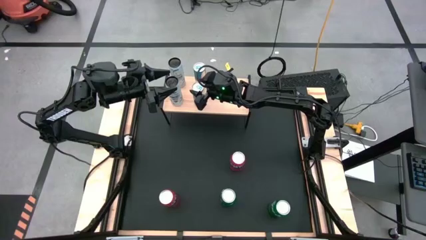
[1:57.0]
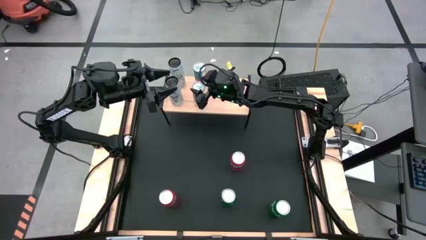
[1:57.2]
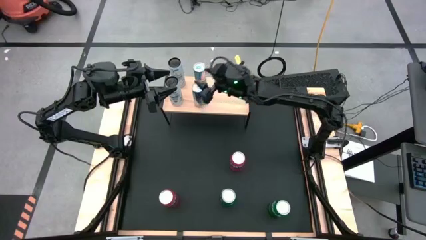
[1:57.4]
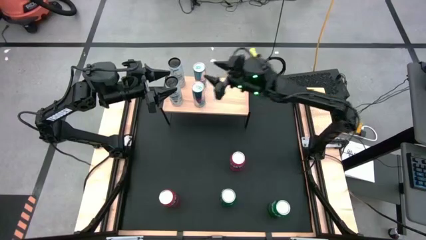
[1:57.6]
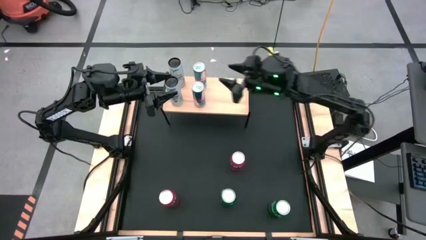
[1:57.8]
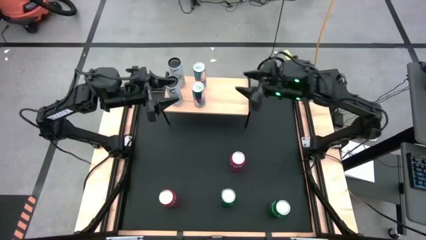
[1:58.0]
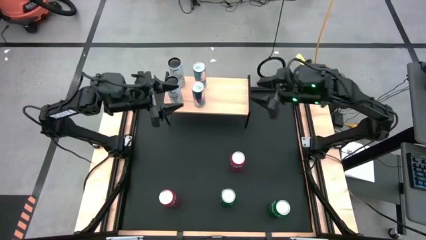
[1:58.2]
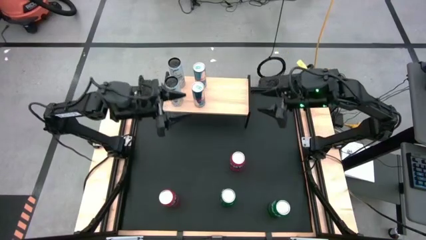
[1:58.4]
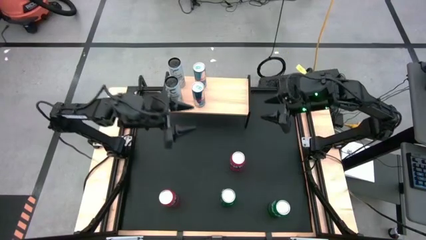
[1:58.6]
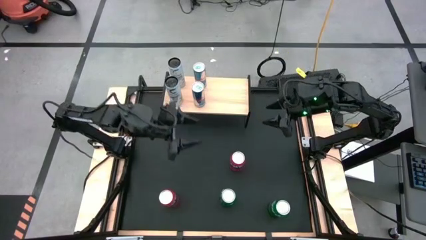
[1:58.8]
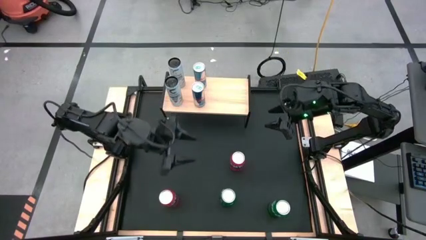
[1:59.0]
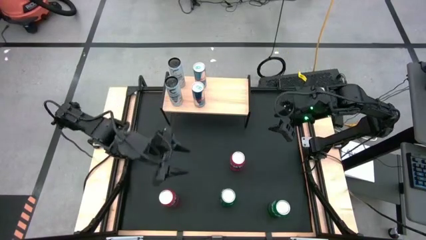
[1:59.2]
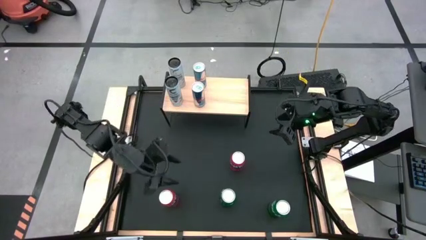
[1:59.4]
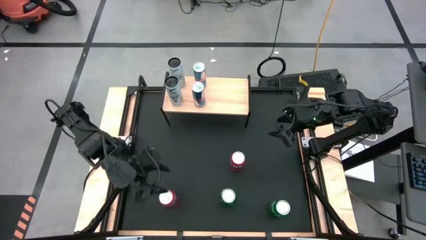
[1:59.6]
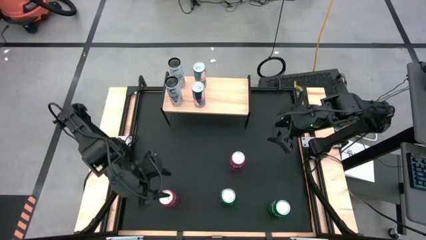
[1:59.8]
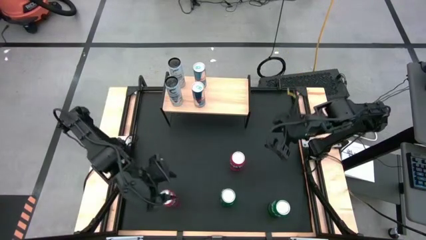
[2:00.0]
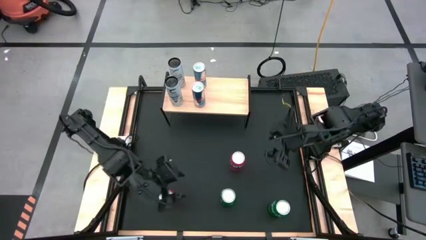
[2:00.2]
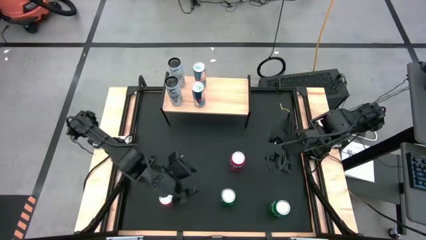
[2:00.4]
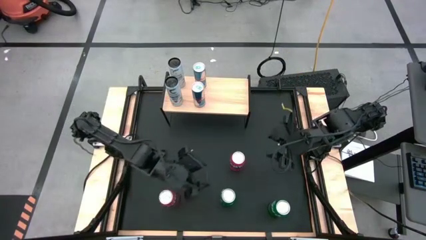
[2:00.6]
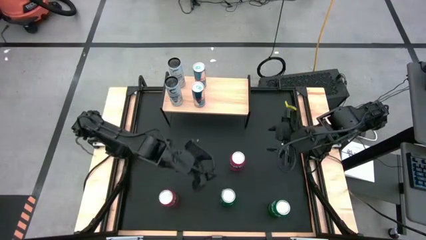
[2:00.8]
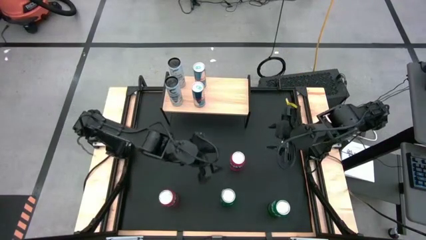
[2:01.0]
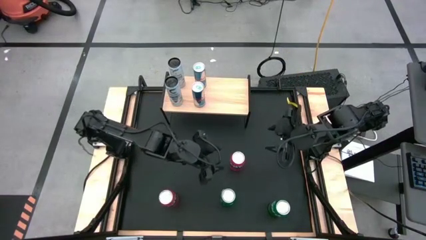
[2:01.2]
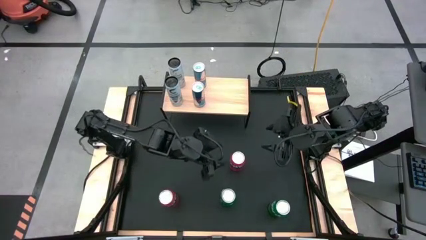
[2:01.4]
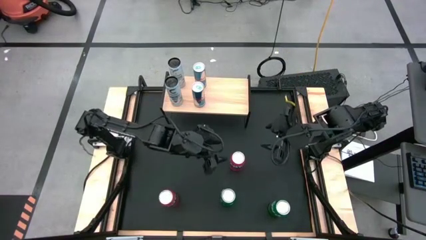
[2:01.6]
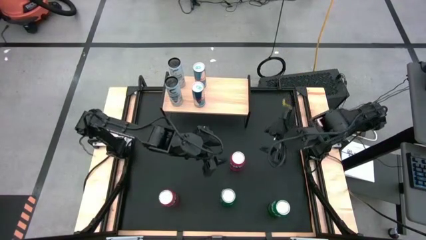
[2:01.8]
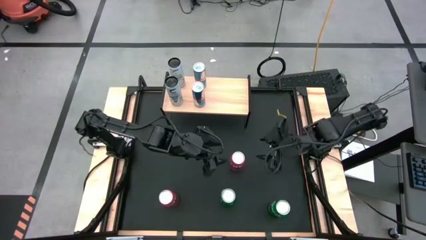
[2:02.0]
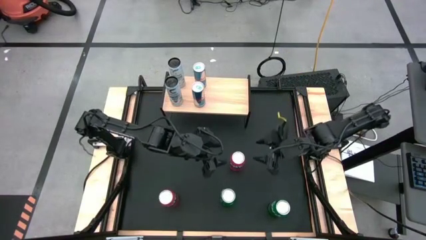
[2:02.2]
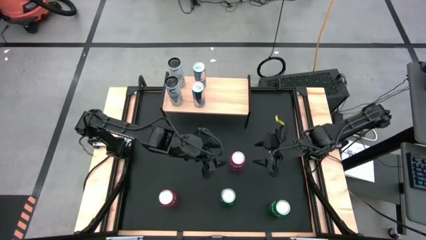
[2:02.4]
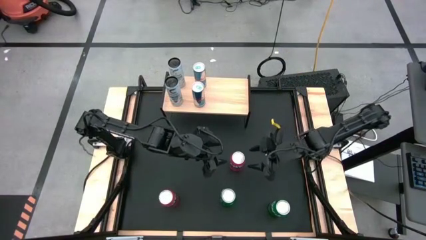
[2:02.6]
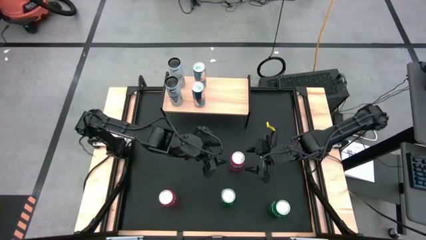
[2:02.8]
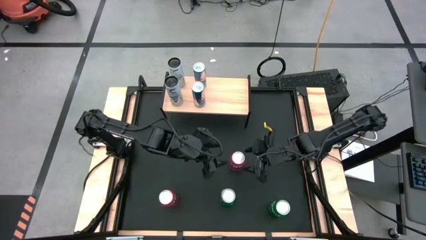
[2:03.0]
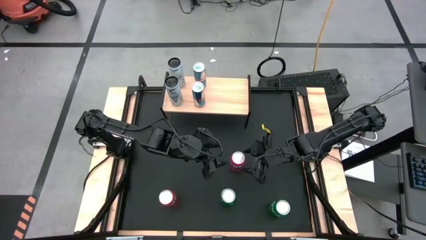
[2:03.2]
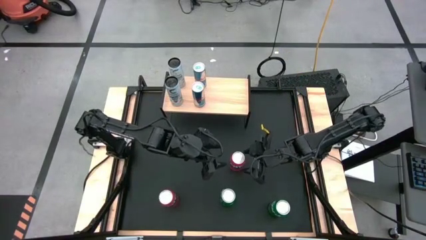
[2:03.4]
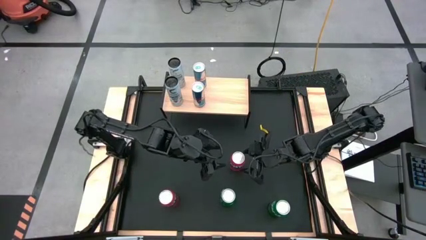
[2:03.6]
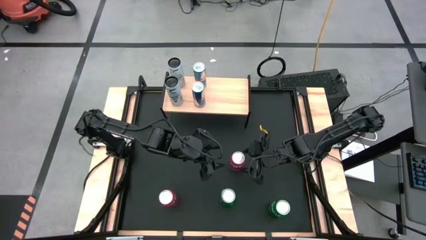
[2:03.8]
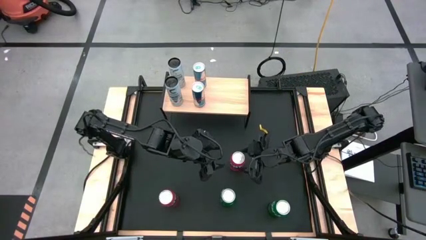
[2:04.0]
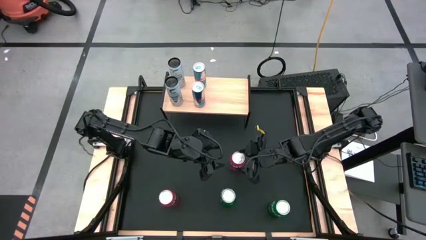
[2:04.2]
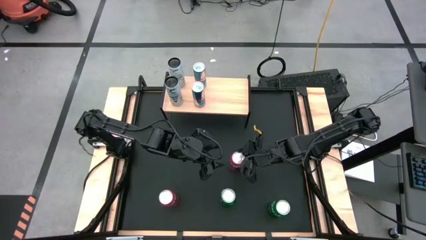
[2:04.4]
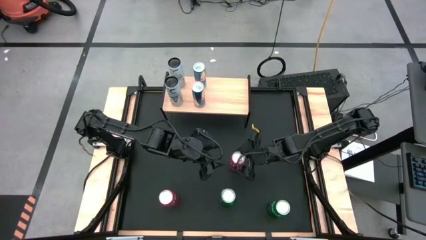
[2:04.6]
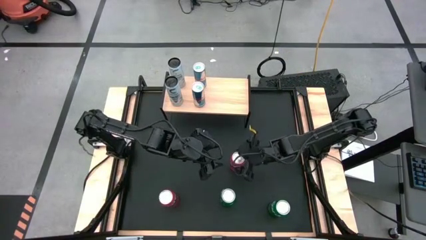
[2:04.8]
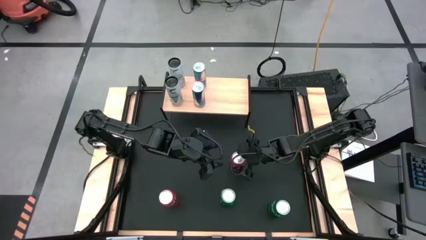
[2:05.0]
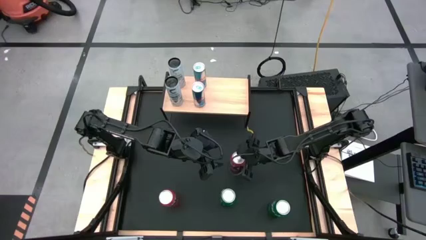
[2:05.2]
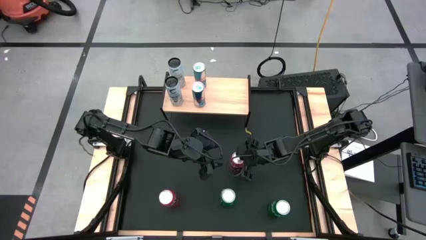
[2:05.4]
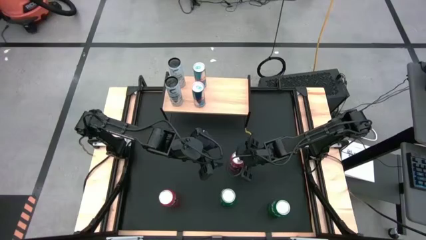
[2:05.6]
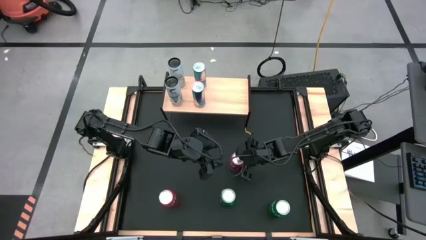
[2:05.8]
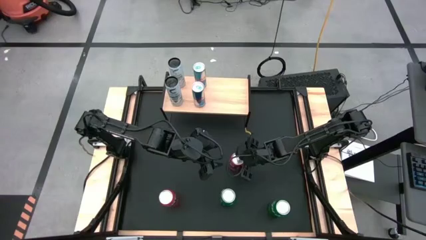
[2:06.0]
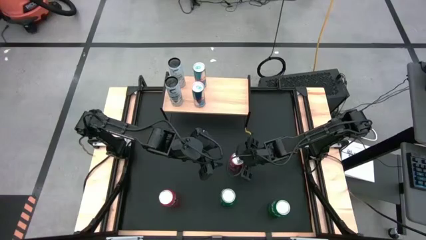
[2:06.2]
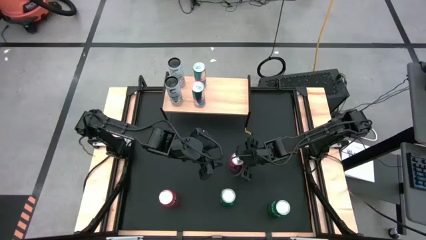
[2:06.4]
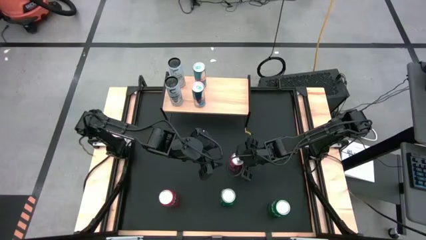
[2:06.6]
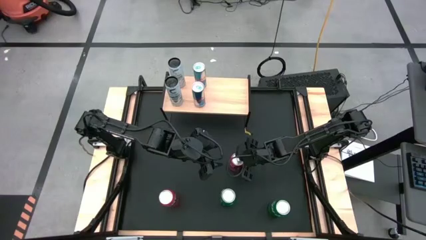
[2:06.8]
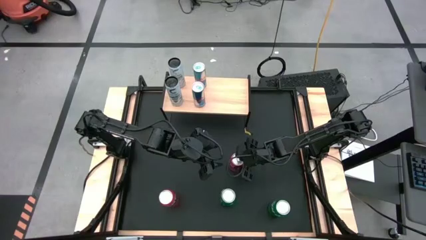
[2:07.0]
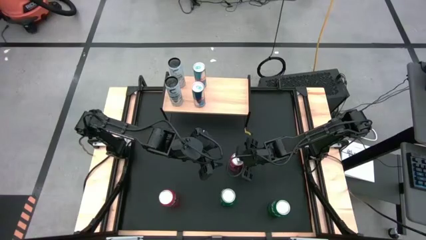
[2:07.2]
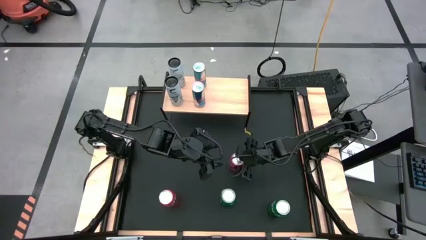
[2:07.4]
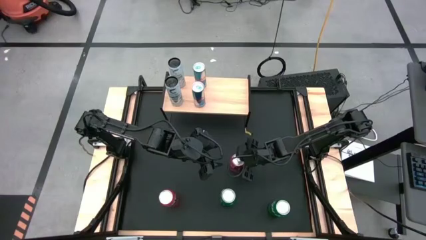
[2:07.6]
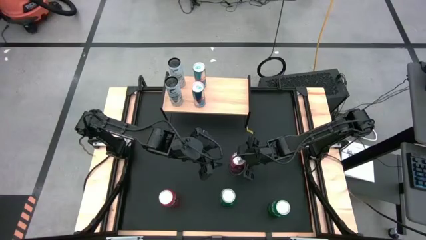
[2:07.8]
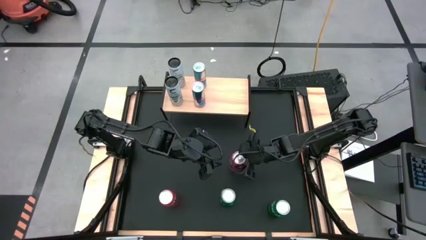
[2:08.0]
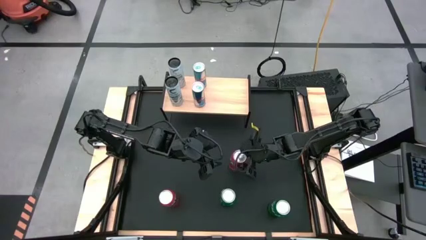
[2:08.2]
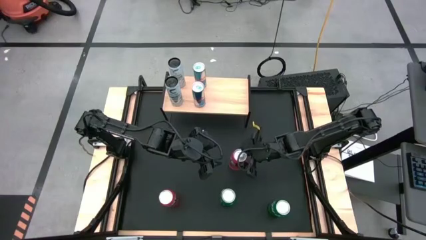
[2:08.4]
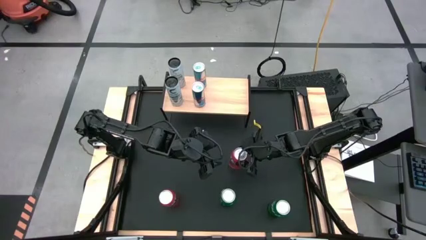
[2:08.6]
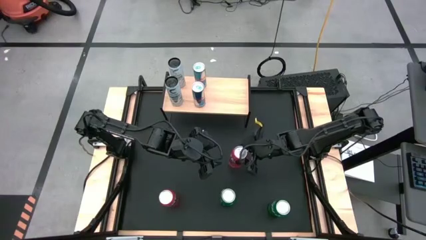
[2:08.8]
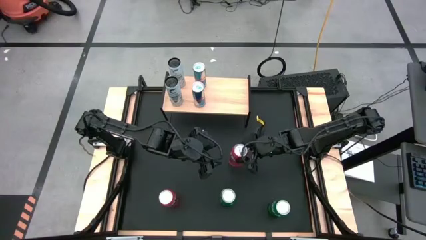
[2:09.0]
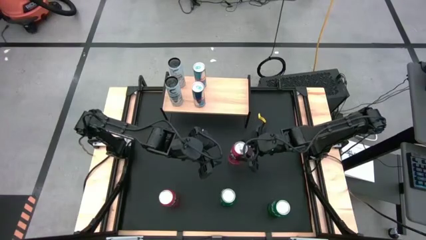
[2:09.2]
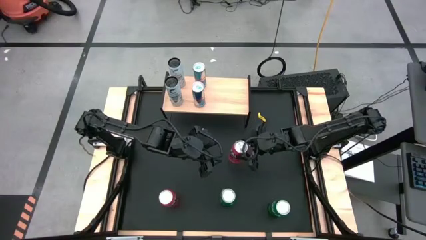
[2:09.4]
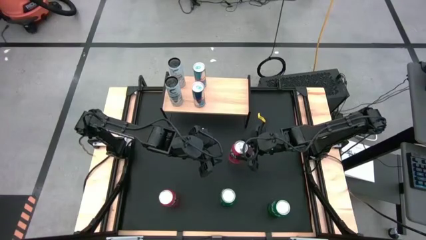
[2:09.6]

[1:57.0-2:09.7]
Task: Place canned beverage on shelf
Put the right orange soda can on the shelf

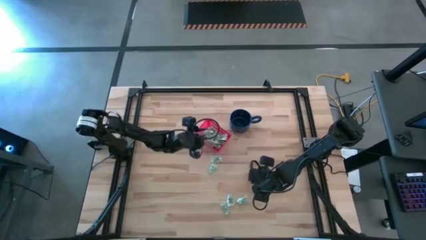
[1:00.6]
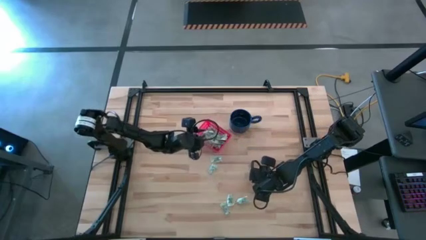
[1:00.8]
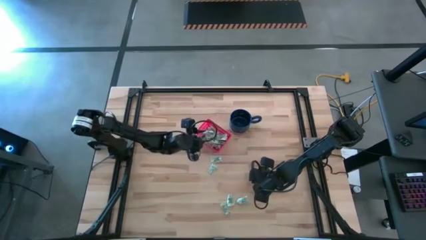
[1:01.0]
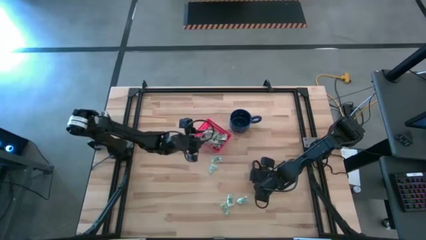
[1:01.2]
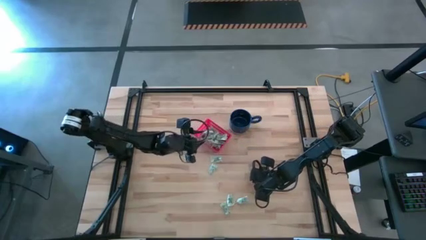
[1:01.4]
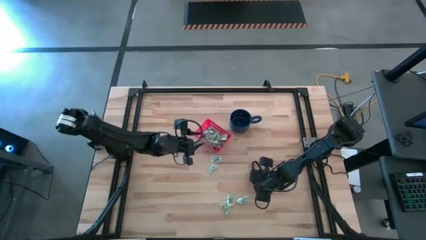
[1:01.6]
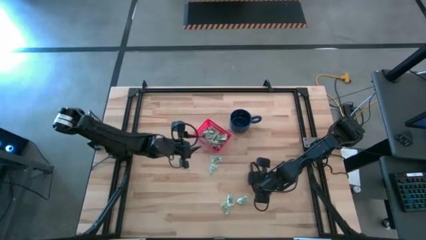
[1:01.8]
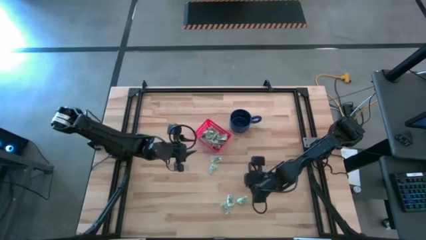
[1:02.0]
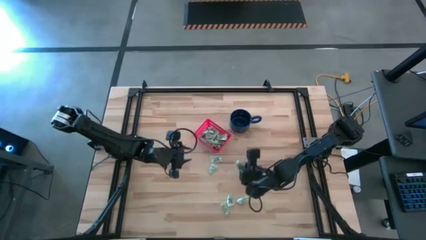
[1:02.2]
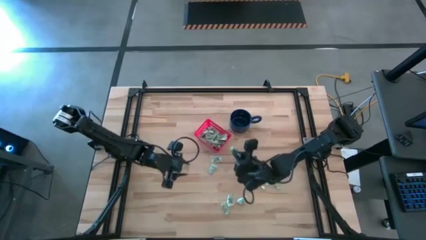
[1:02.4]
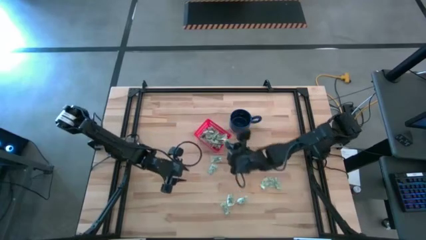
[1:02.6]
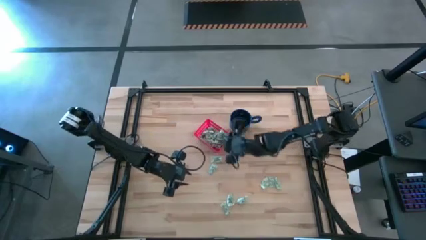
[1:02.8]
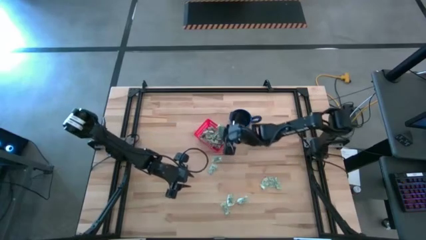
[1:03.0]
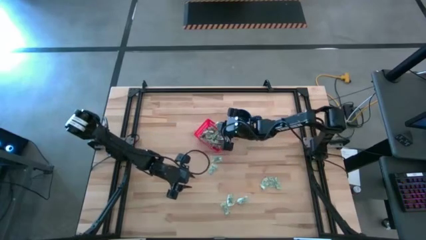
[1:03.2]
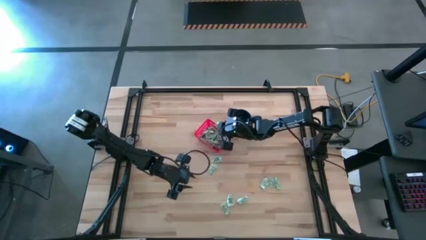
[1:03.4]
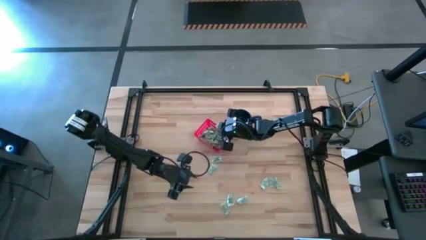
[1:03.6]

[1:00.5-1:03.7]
Task: Pick and place items into bin
Put the stevia packet into the bin

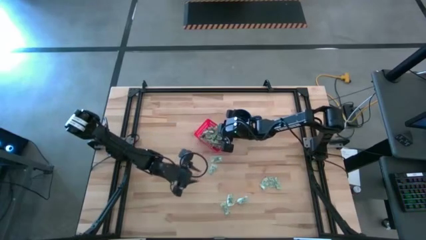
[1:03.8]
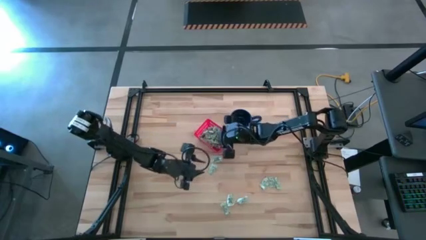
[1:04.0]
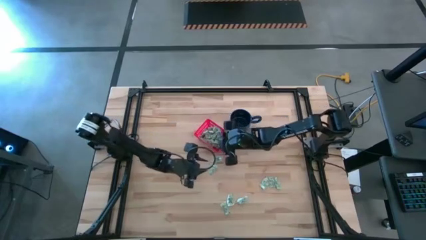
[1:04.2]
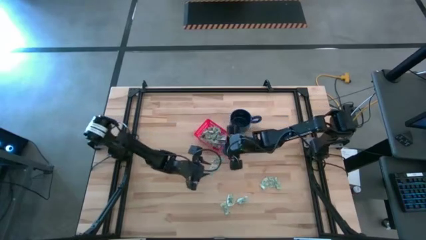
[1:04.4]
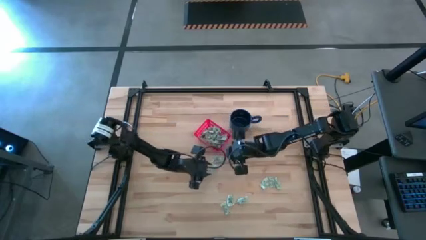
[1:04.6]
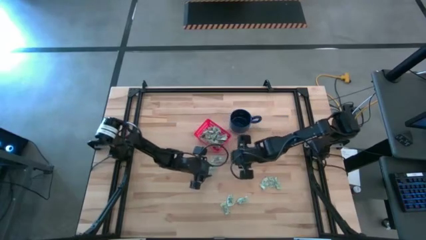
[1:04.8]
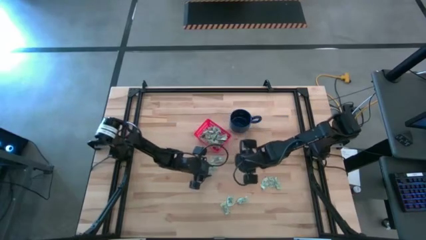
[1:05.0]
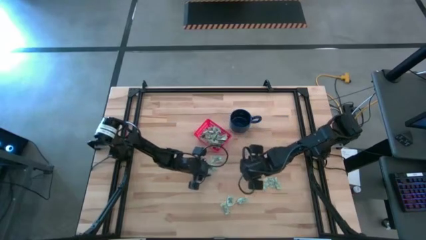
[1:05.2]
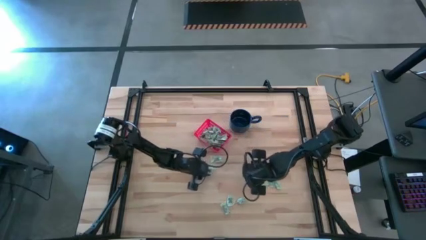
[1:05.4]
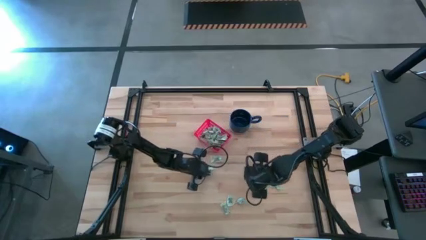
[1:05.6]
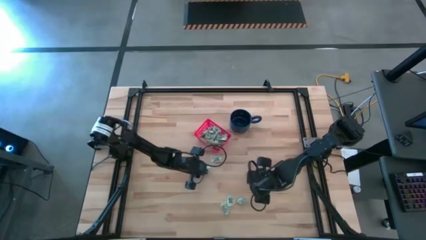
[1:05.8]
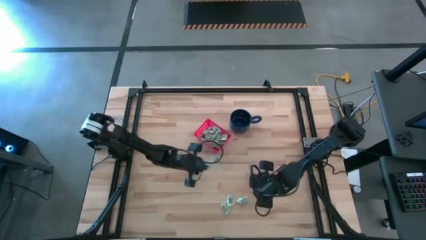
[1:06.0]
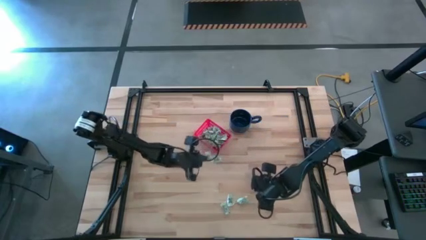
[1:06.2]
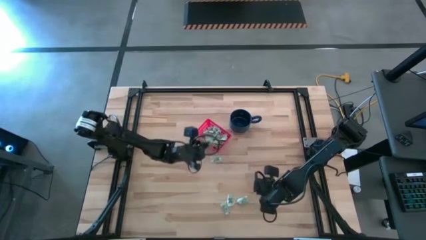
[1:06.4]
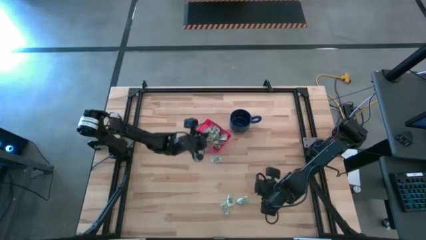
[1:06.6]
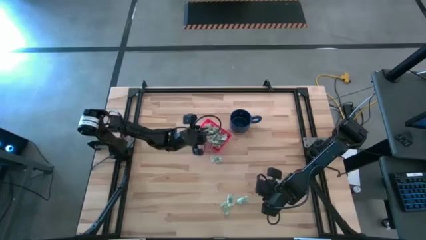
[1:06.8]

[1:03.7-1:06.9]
Put the stevia packet into the bin
